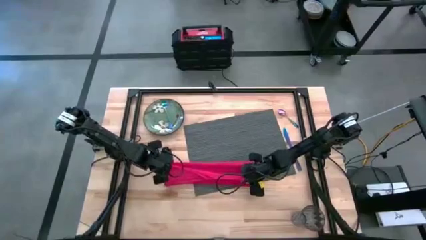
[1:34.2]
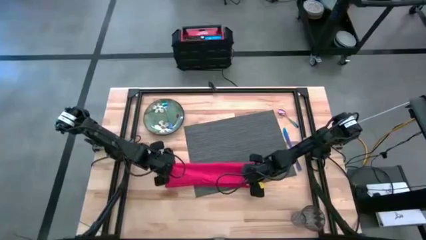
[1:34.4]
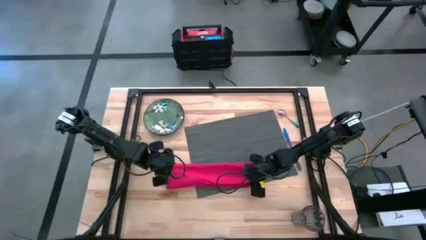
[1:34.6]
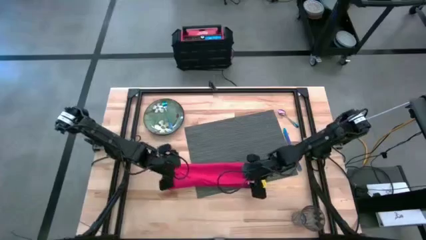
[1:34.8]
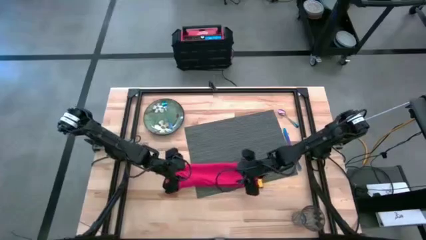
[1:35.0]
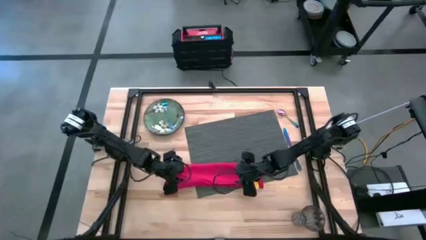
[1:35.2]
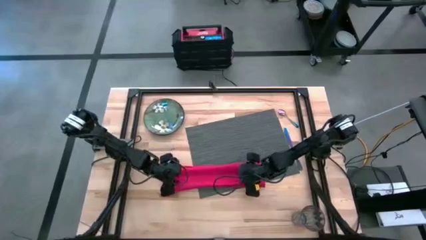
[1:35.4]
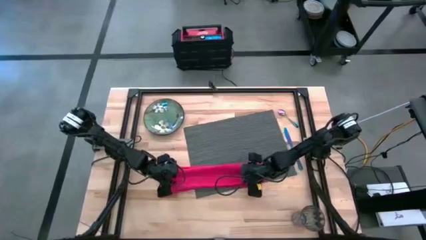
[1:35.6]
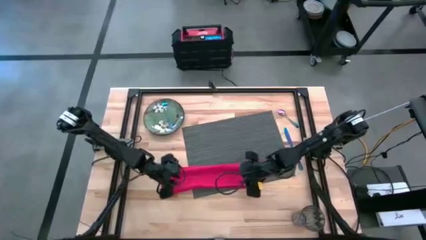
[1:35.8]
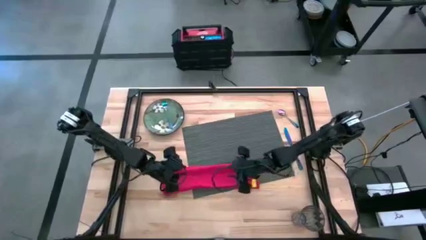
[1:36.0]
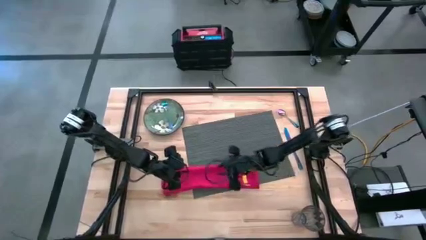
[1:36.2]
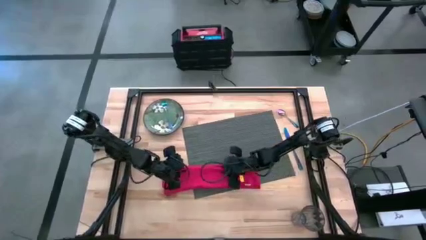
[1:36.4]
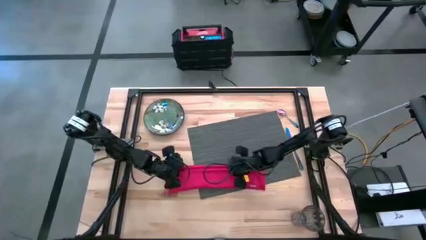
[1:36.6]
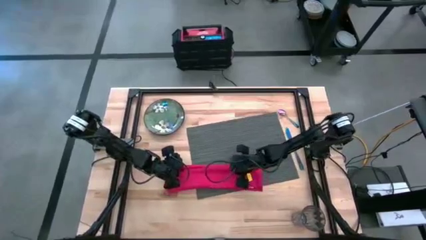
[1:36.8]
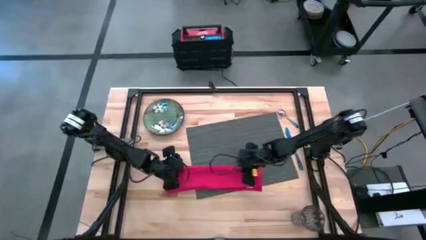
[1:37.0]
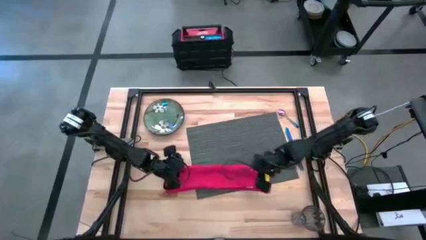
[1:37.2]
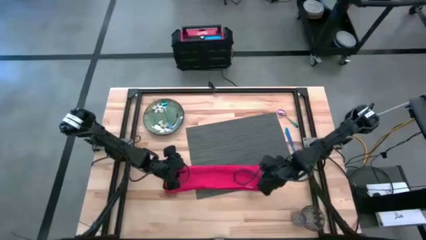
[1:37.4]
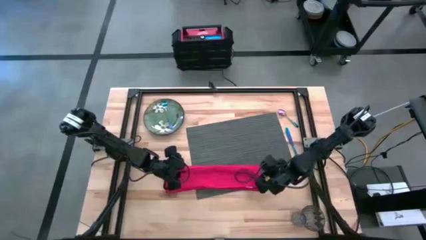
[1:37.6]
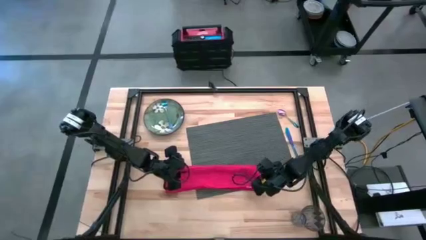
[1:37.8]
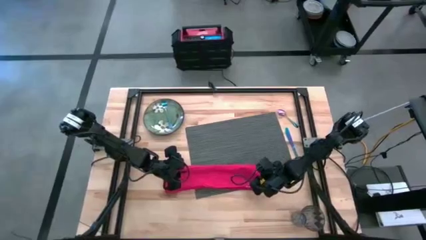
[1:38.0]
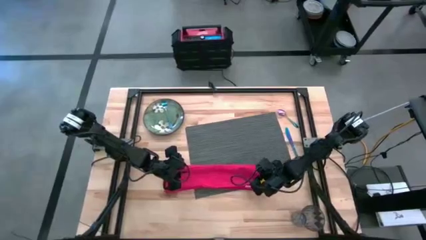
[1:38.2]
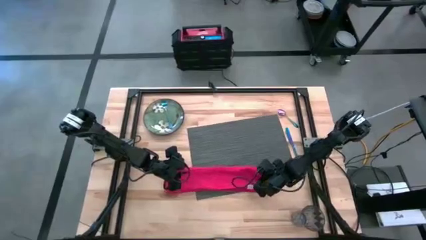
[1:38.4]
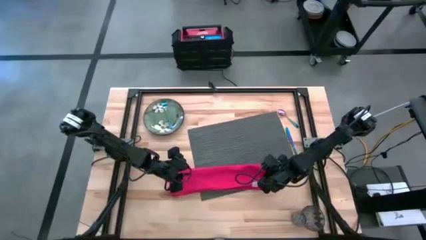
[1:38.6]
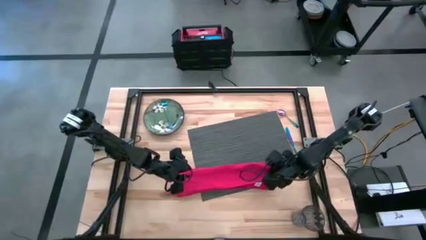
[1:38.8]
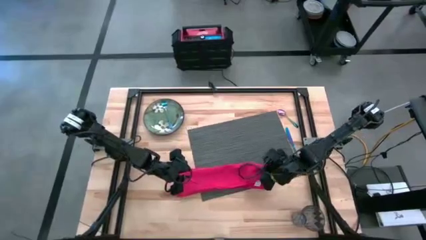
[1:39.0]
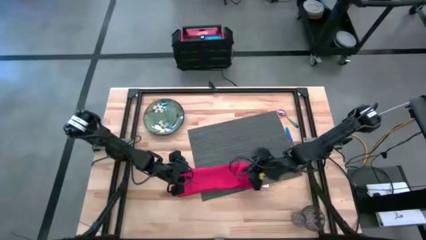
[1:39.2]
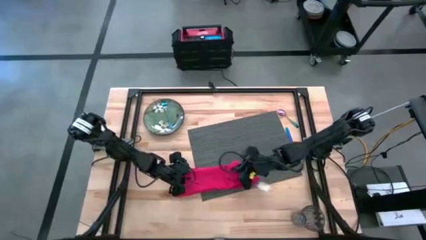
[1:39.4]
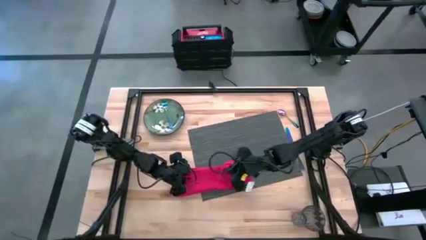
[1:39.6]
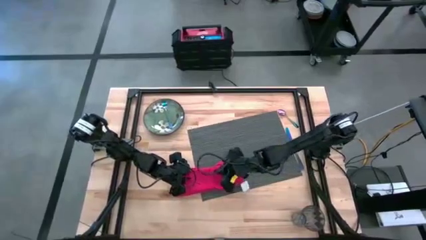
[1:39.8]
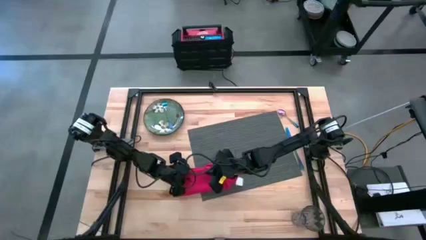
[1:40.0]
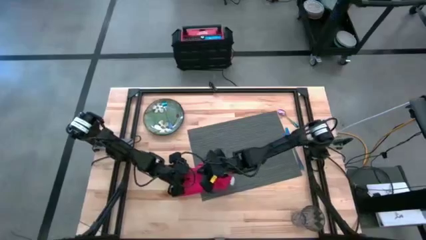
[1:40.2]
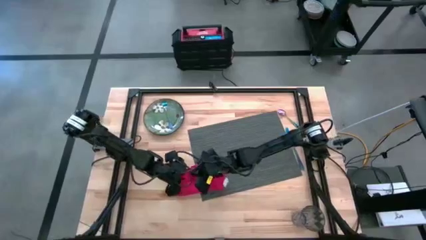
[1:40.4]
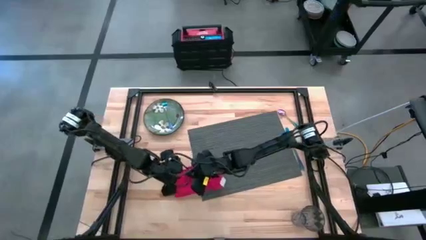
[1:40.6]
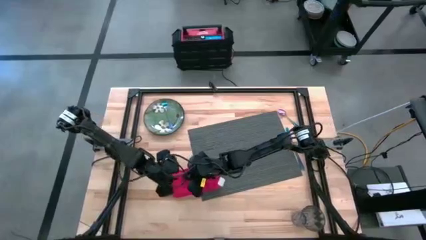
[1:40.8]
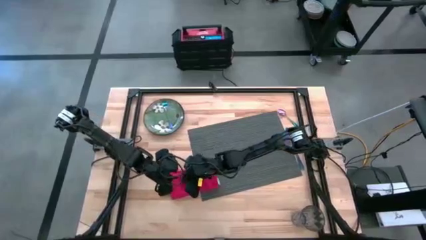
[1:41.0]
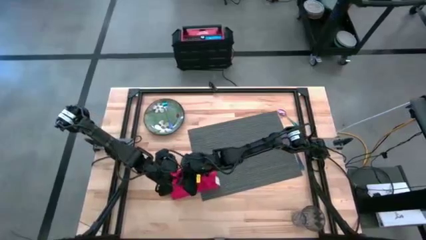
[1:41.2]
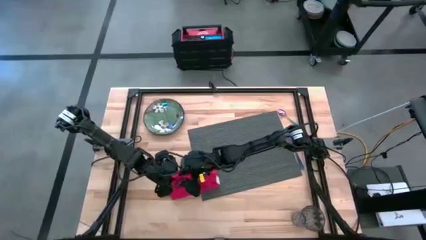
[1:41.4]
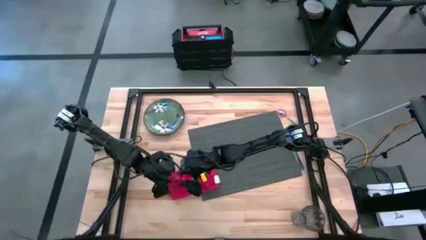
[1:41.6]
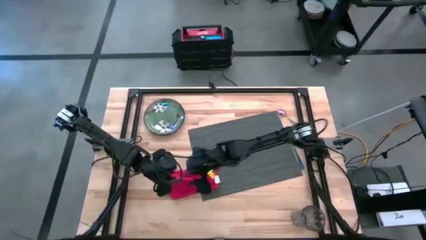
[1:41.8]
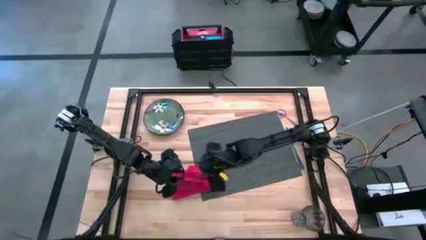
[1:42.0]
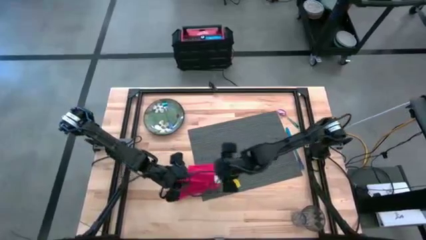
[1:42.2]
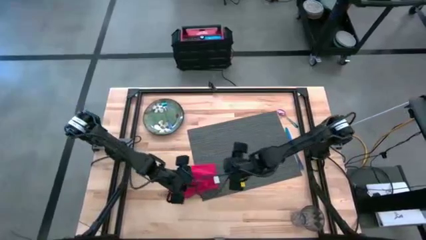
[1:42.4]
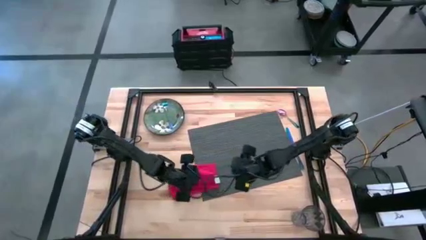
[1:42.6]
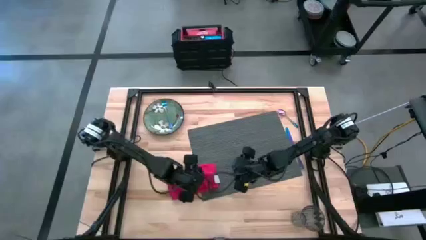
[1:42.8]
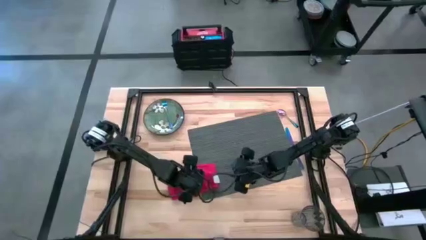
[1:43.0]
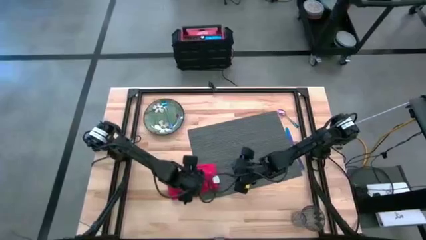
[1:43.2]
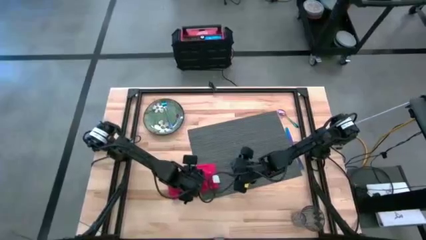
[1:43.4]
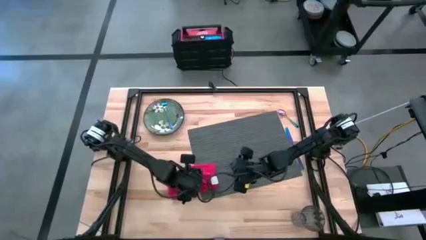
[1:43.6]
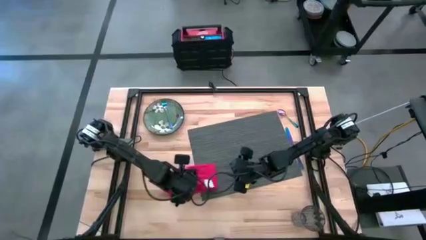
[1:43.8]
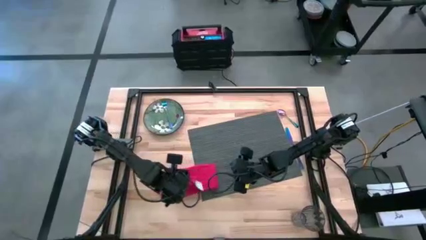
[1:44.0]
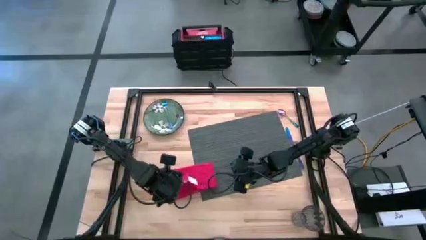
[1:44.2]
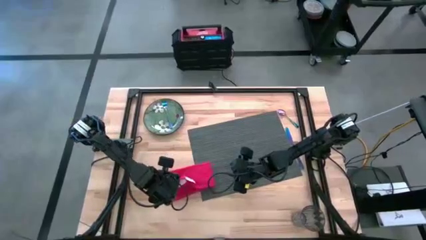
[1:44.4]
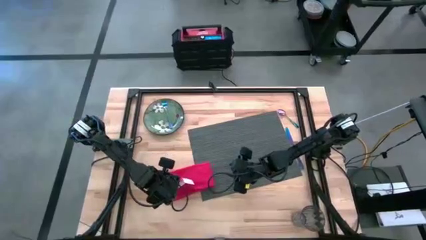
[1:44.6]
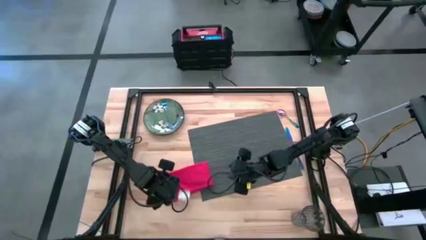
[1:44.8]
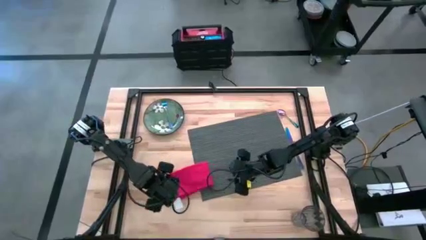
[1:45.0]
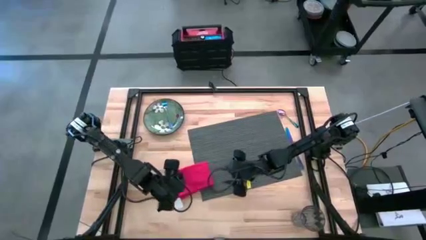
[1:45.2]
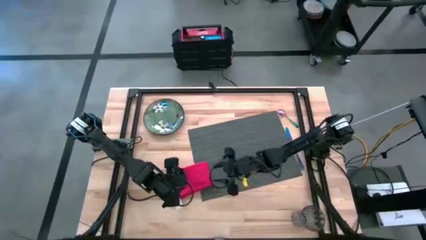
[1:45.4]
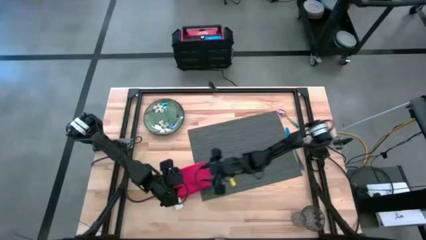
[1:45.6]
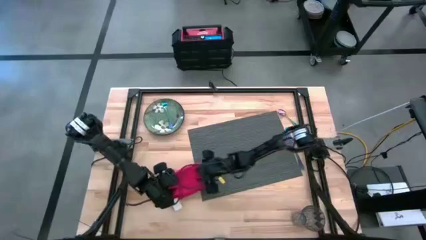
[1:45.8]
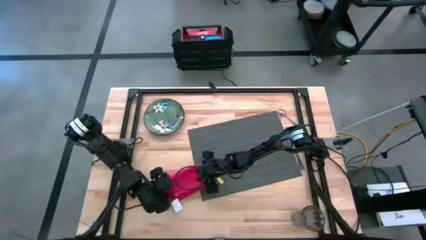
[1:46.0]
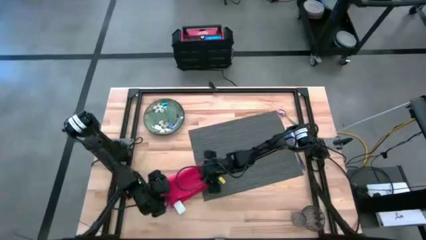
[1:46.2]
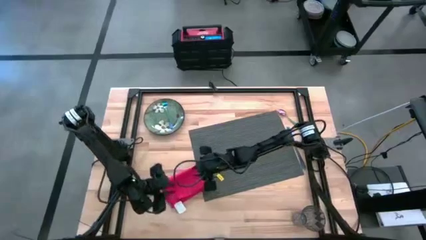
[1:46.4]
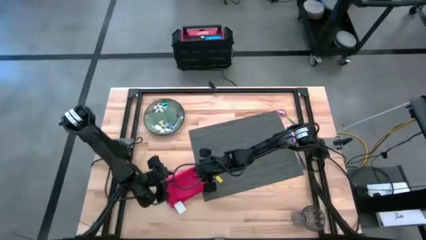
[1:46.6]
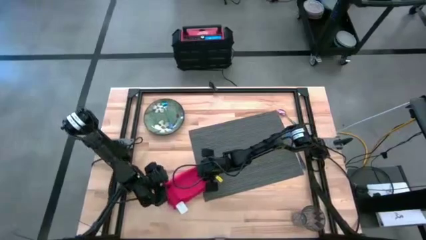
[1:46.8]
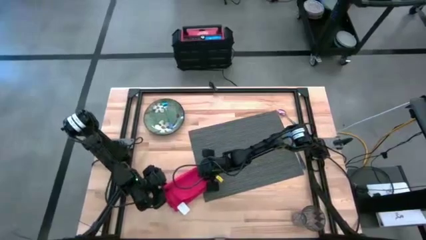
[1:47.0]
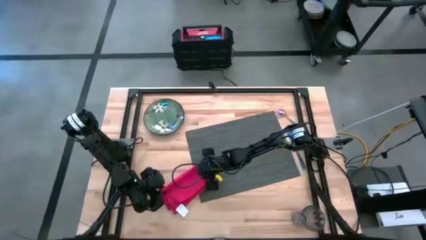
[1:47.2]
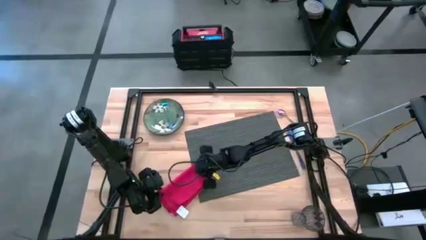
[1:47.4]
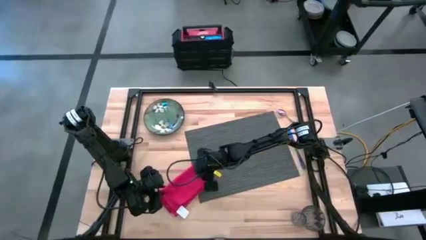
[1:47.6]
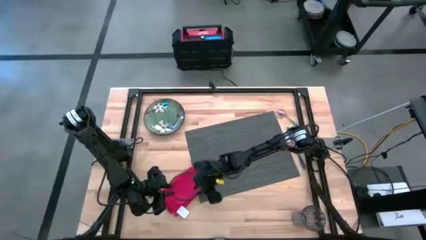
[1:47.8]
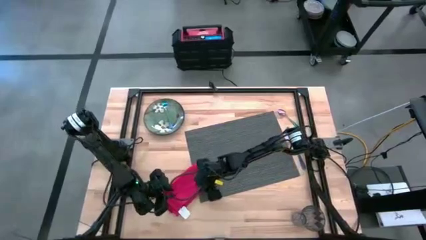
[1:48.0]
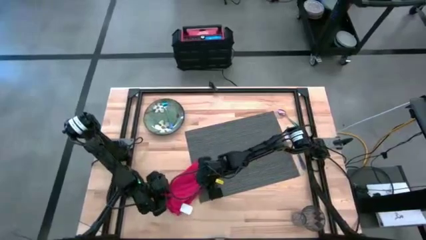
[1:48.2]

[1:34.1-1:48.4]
Task: Set table place
Fold the red table napkin

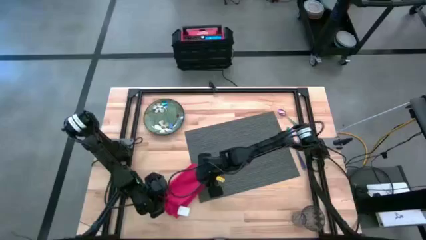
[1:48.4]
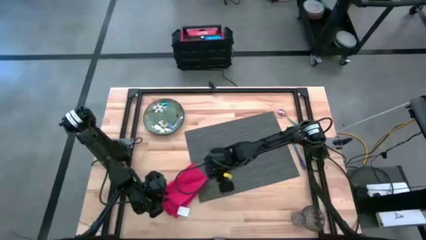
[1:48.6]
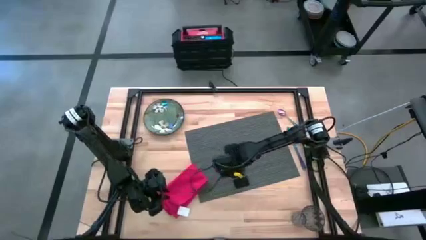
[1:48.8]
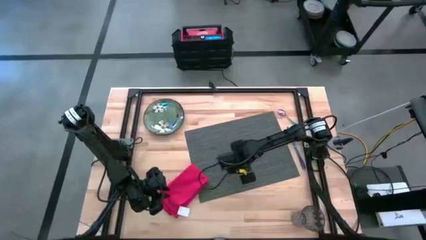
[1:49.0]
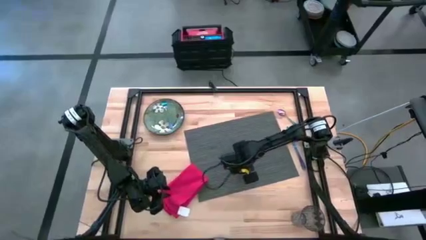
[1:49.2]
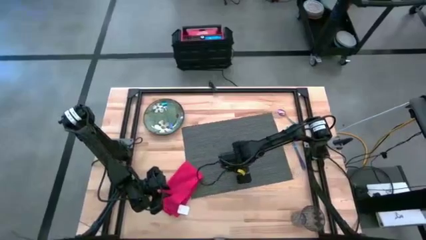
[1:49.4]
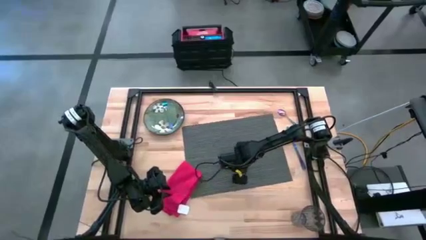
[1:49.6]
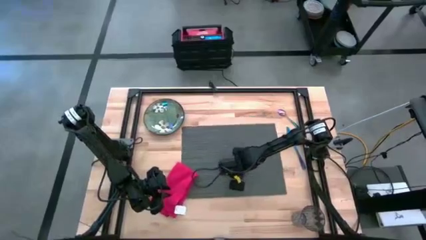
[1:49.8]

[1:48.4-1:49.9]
Adjust the gray table mat on the table
